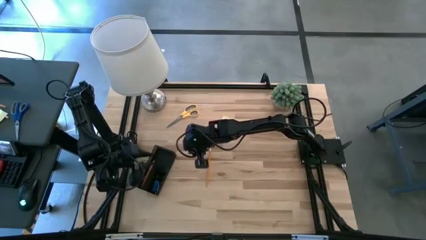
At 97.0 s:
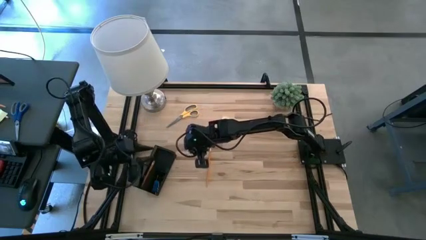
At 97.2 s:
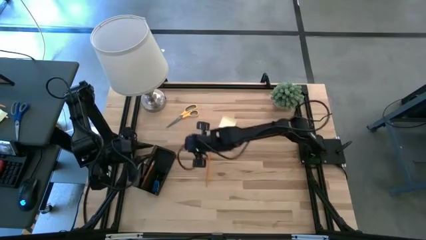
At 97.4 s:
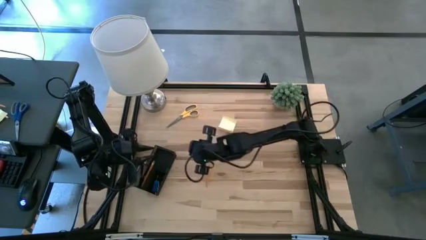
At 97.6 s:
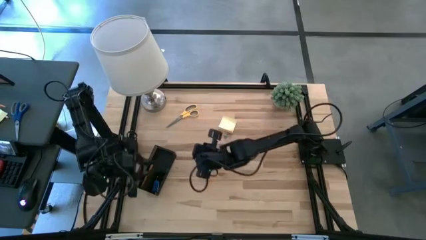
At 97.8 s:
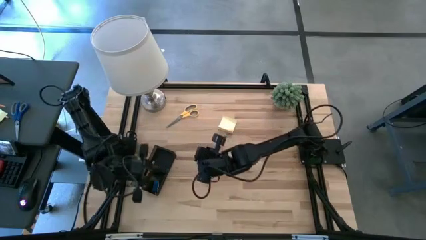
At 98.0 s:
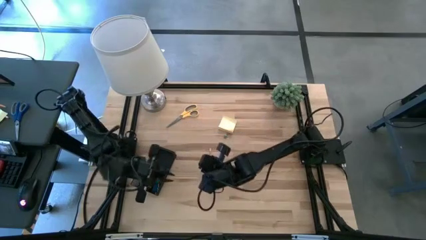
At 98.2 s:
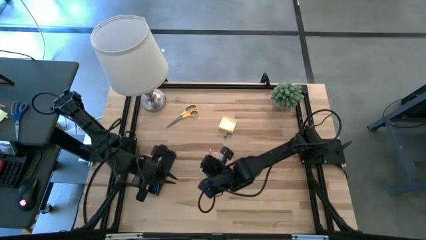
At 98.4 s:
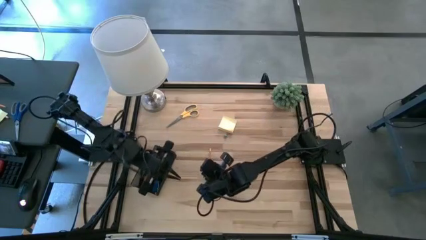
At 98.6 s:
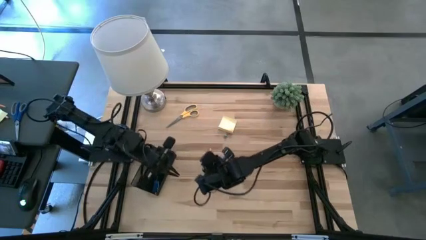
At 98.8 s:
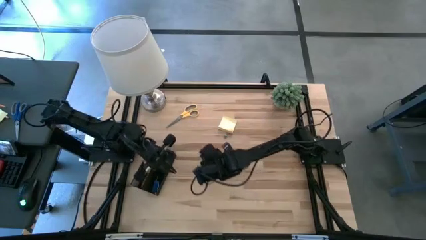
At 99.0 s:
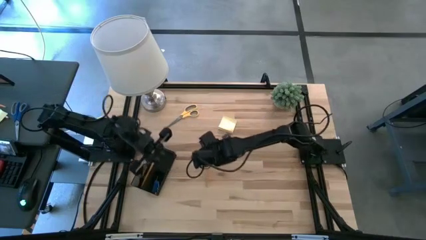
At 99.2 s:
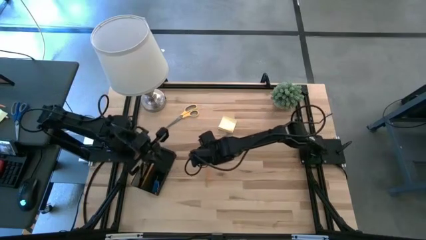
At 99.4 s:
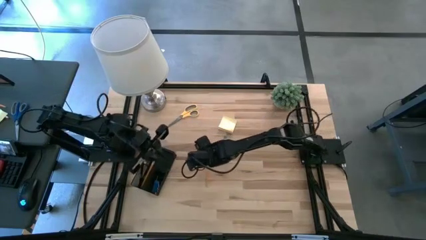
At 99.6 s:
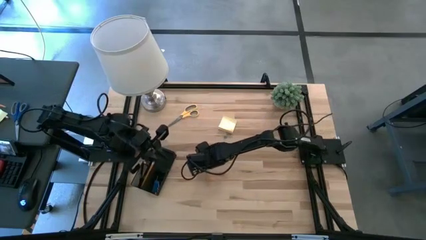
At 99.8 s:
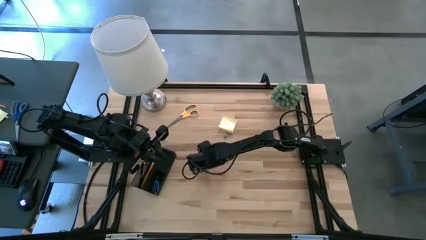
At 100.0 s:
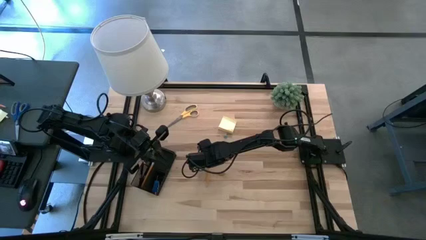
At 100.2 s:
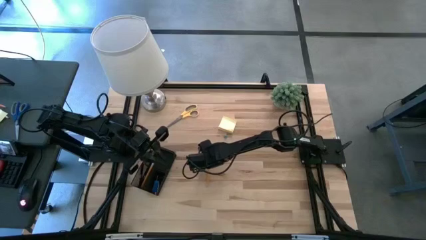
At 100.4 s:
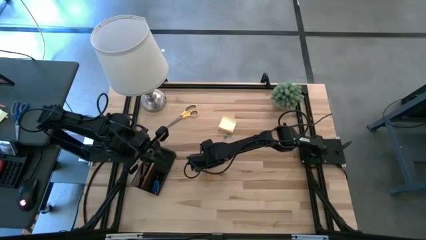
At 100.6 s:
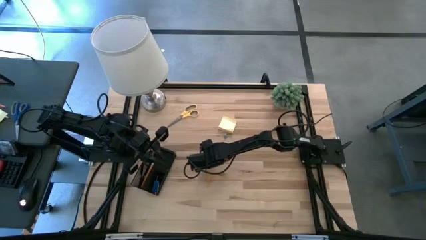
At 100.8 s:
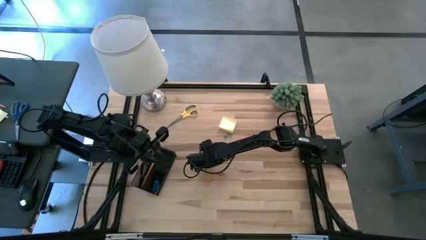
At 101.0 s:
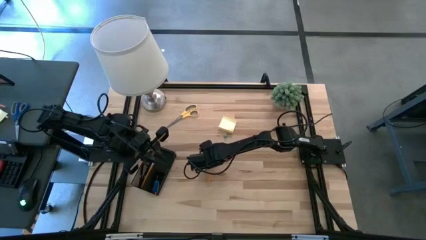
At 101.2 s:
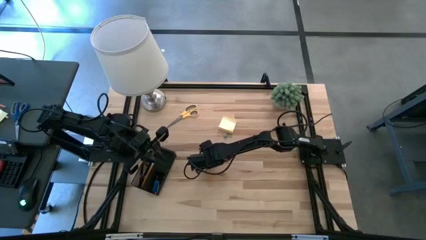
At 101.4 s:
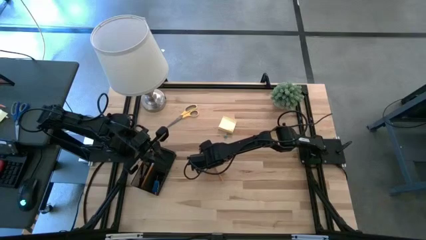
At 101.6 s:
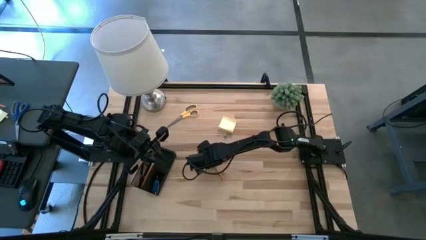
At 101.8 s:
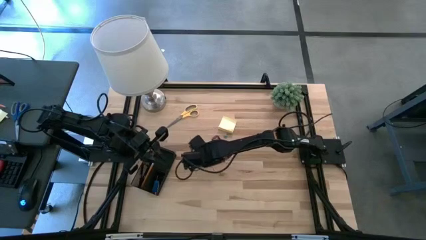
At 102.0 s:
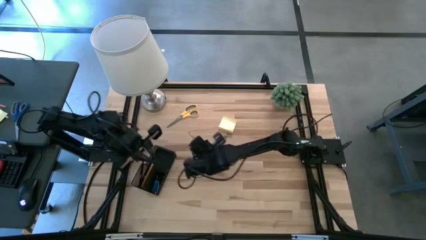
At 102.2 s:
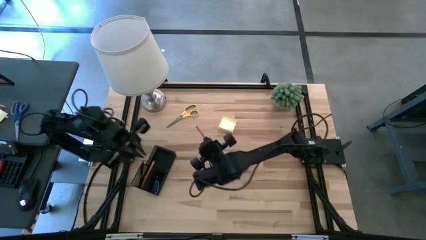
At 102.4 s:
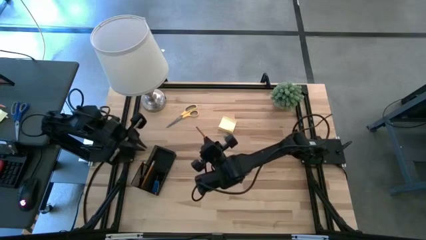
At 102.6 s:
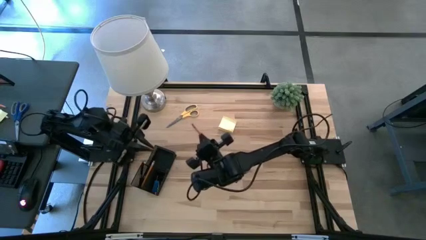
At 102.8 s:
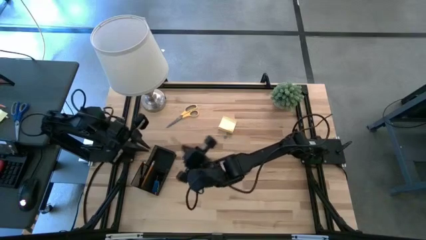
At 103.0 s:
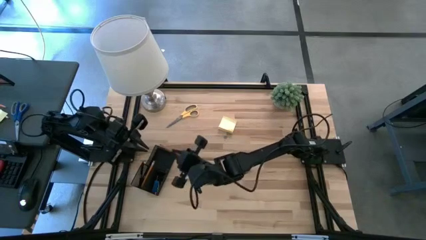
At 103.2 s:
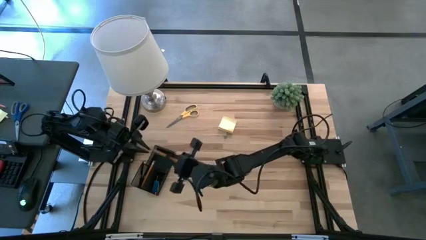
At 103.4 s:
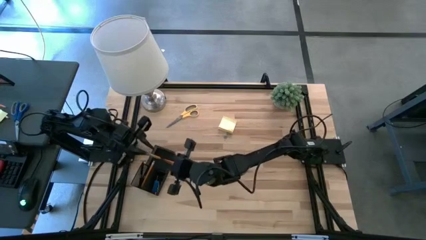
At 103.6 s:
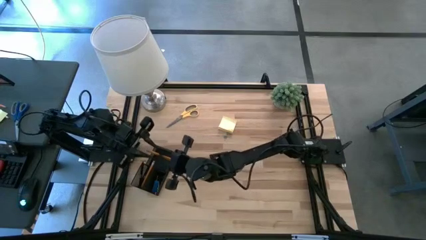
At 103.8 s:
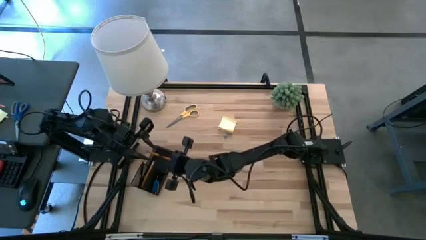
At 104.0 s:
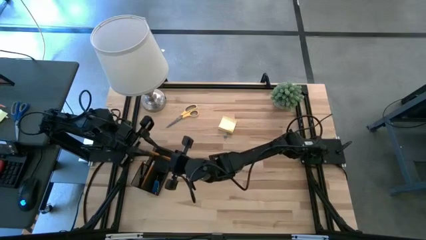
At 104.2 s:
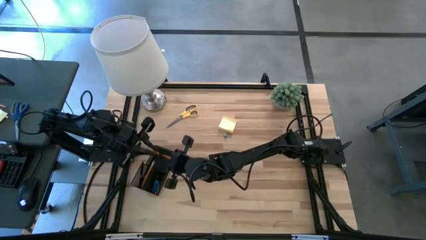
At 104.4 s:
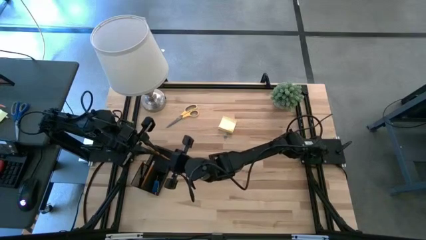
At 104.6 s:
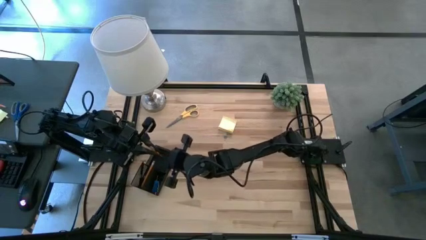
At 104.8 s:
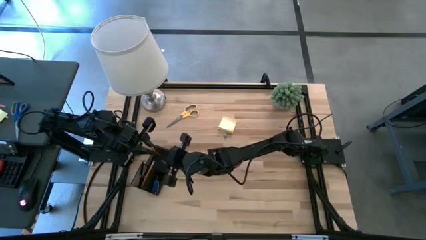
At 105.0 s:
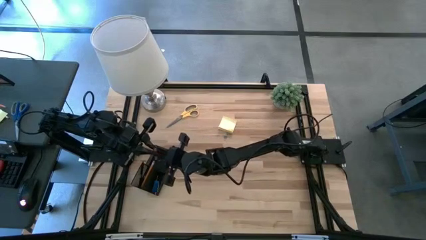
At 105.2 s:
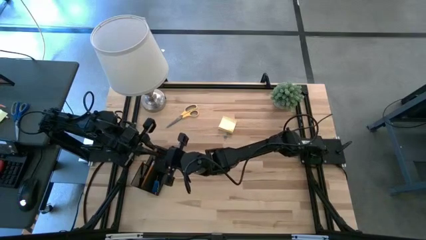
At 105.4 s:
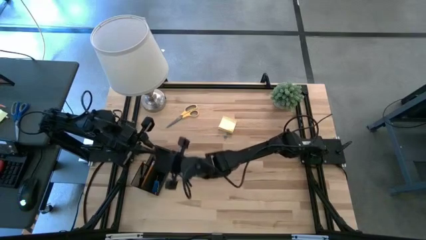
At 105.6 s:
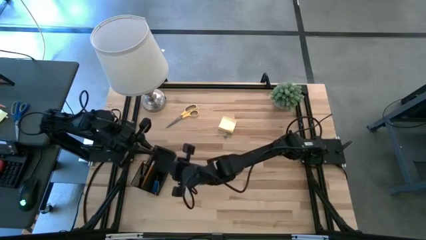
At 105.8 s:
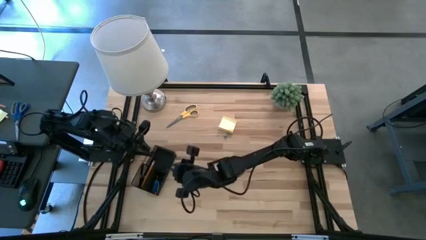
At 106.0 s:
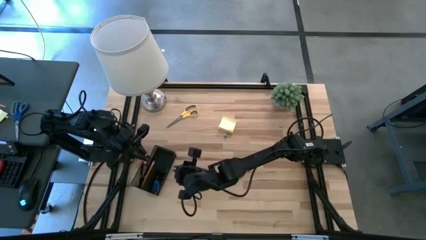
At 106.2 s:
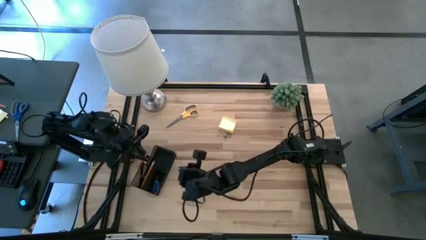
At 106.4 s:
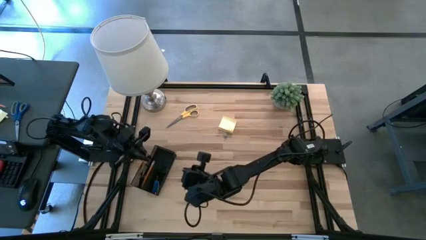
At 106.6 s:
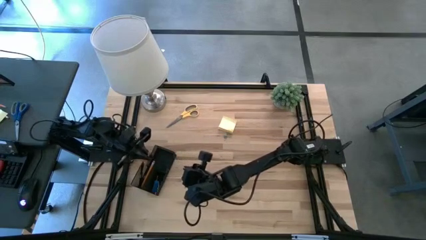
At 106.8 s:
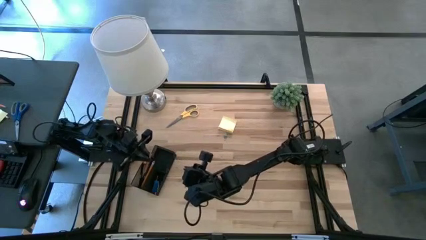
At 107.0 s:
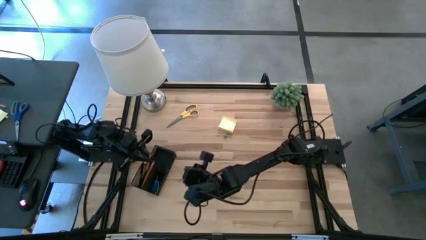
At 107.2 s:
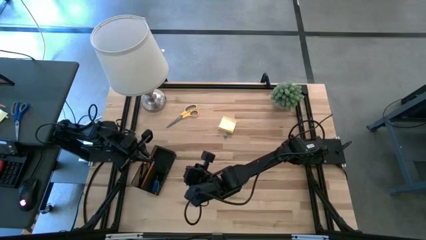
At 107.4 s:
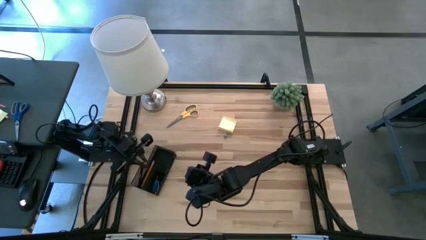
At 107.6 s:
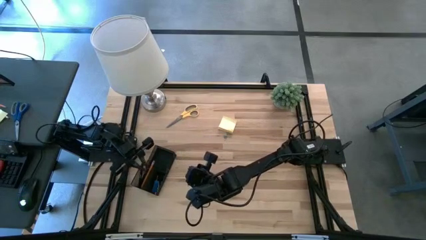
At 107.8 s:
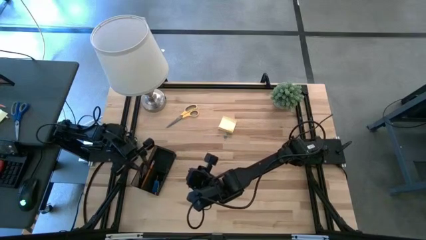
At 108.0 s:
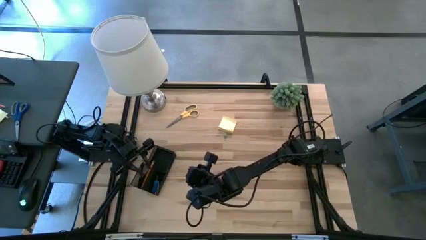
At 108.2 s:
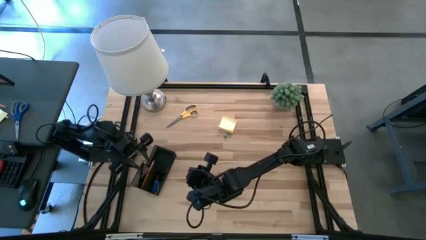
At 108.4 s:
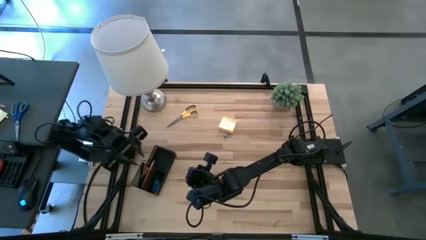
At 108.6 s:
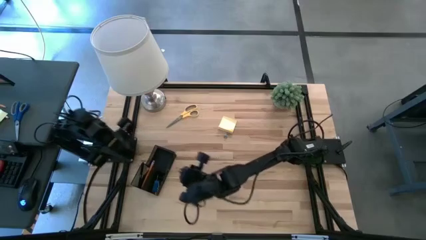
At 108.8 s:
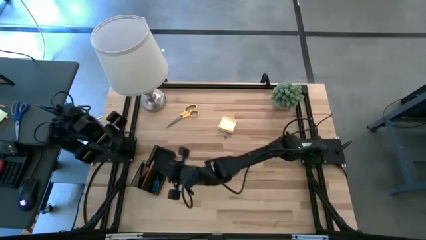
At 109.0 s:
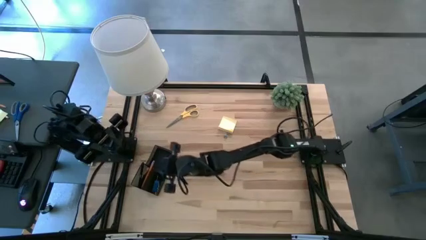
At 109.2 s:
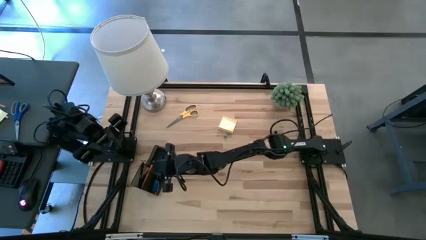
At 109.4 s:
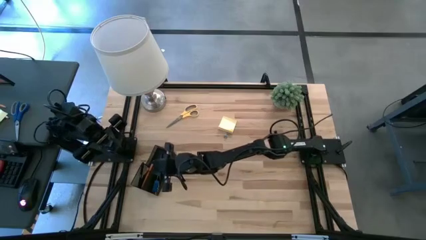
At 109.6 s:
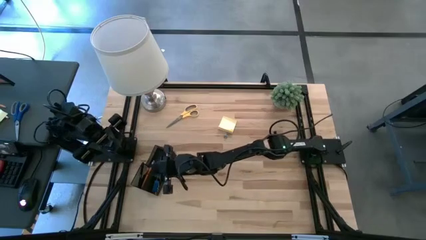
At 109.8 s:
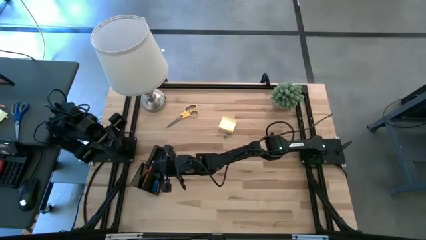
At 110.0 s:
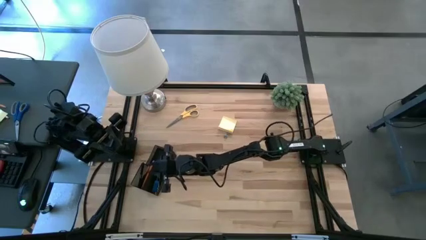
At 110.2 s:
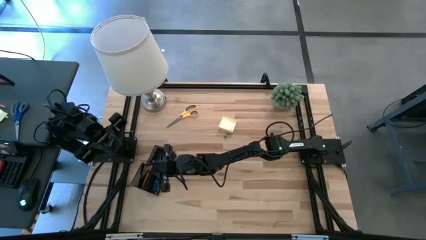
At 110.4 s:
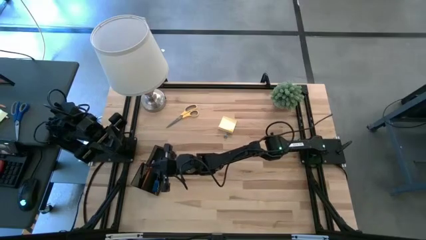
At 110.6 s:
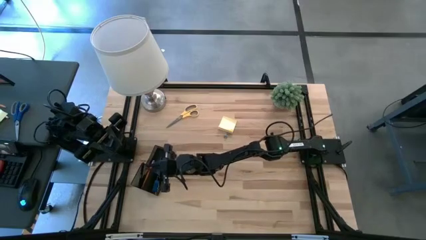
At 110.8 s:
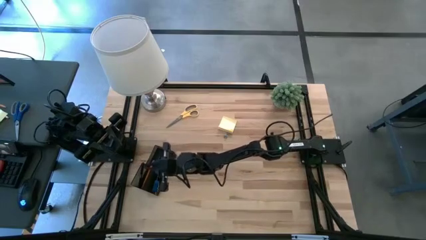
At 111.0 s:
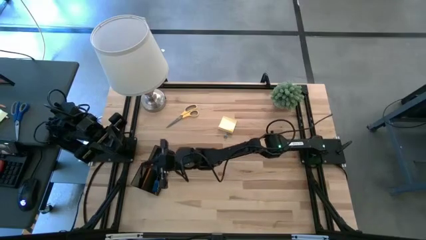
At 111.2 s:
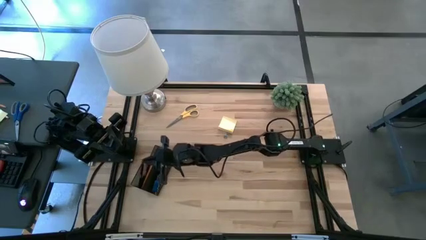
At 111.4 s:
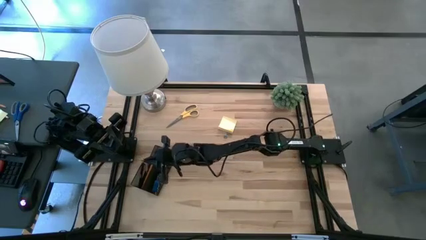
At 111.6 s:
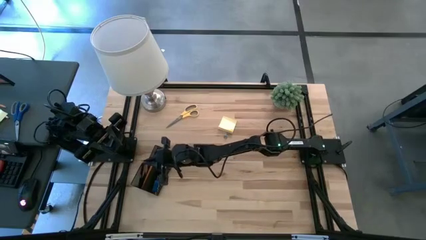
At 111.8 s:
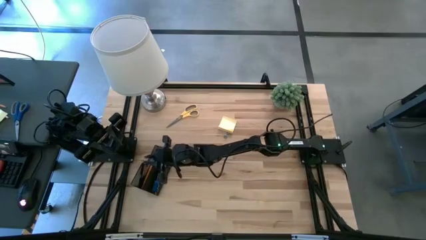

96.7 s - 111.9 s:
Task: Pick and place office supplies into organizer
Put the yellow pencil into the black desk organizer

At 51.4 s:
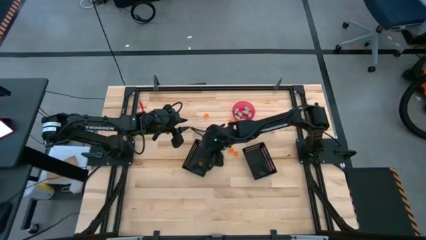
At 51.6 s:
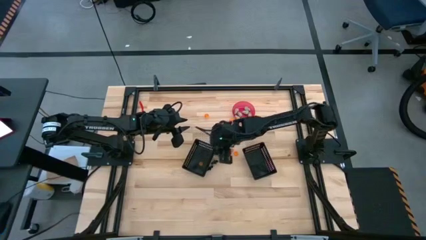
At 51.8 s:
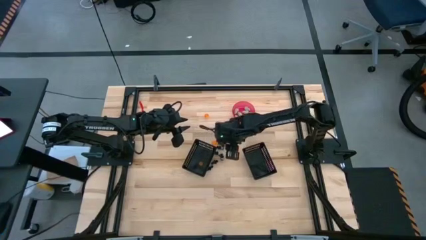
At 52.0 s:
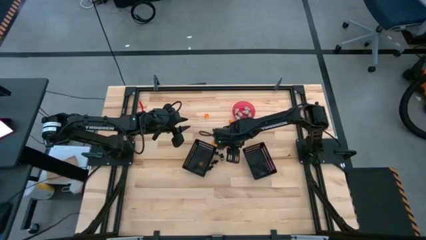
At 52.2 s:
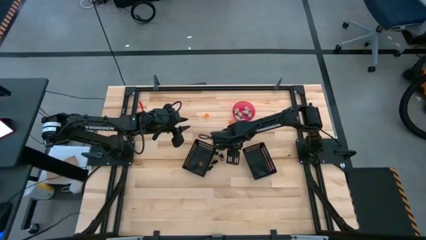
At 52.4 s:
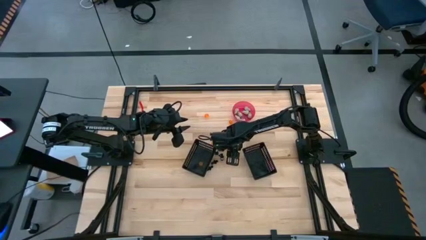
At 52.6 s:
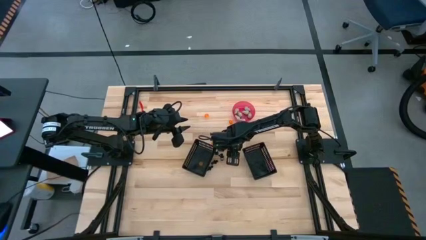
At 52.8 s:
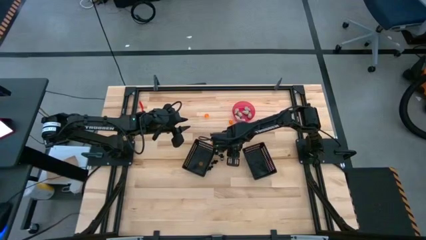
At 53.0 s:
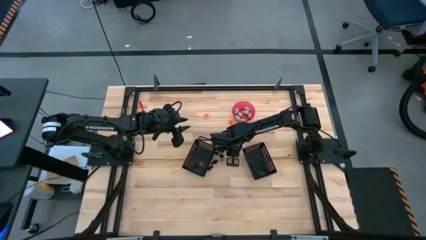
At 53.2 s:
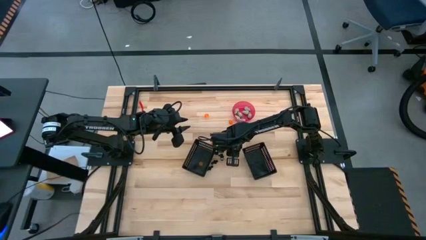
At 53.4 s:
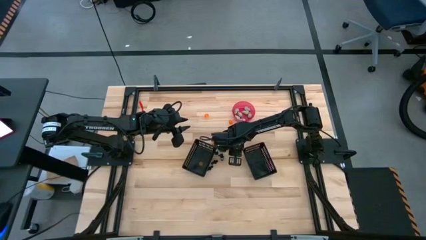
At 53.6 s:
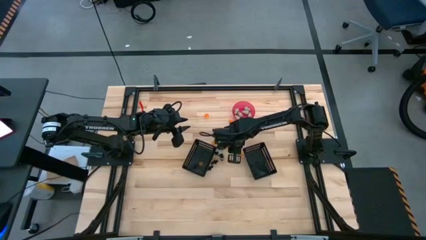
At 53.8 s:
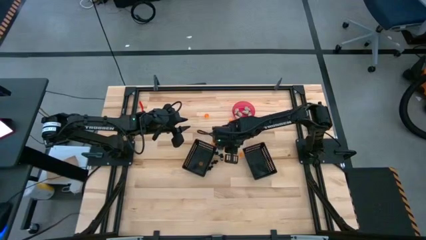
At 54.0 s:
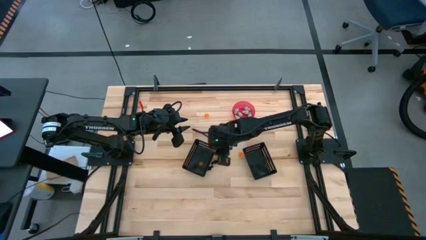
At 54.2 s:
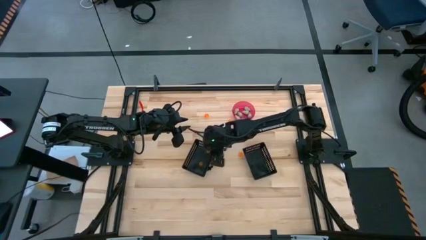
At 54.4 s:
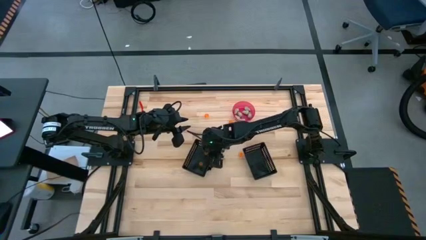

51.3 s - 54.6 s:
Task: Sort Halloween decoration
Put the orange pumpkin toy into the left black bin
